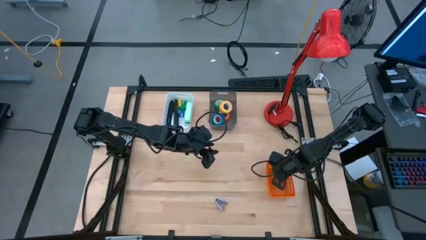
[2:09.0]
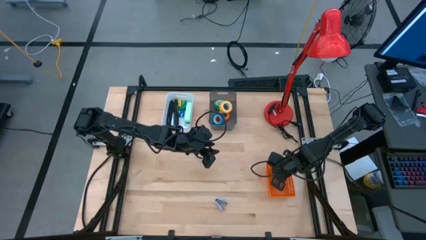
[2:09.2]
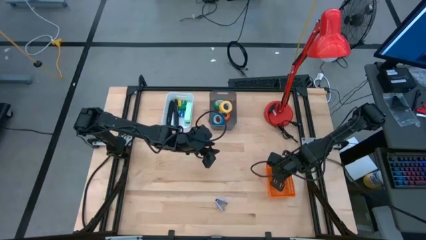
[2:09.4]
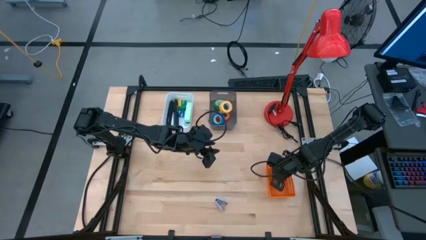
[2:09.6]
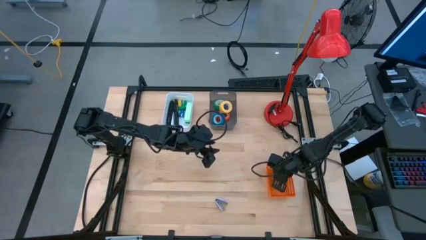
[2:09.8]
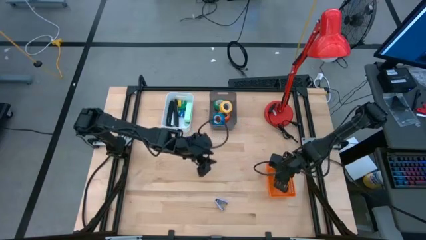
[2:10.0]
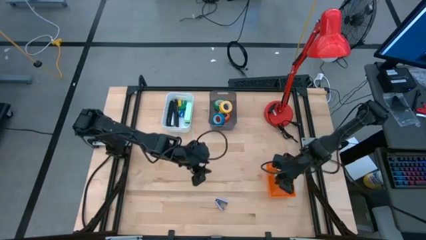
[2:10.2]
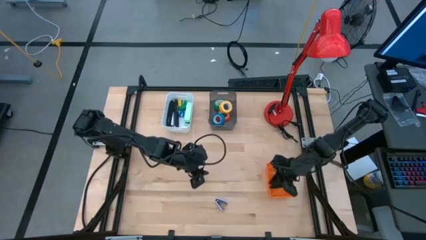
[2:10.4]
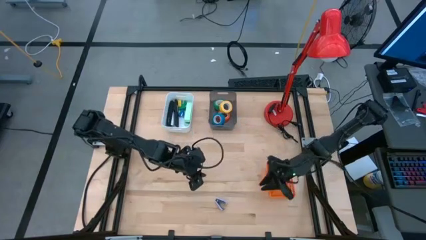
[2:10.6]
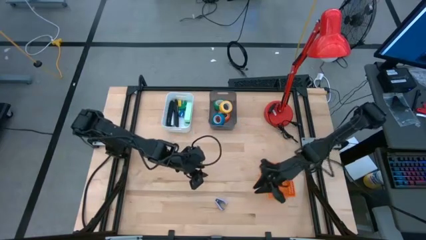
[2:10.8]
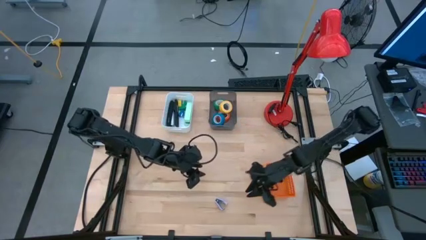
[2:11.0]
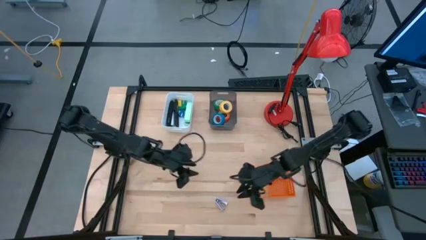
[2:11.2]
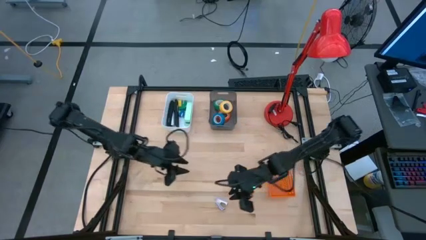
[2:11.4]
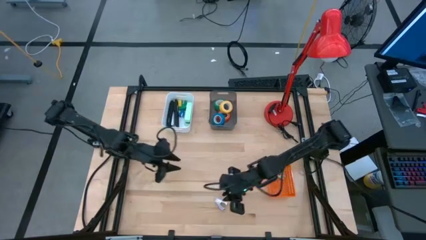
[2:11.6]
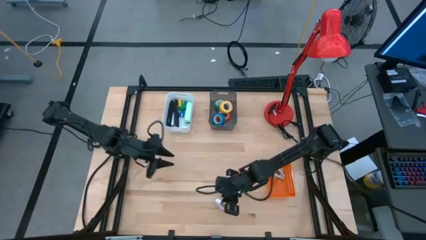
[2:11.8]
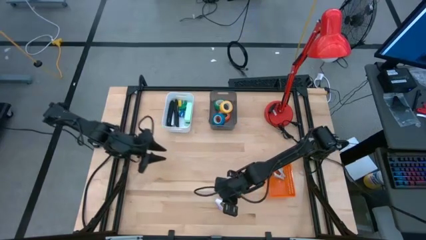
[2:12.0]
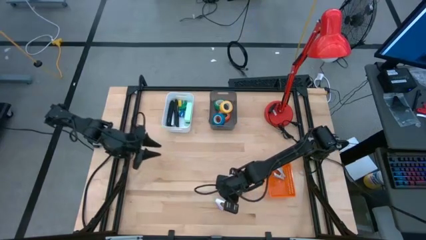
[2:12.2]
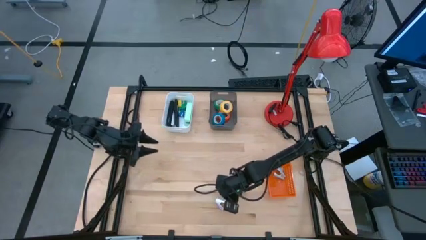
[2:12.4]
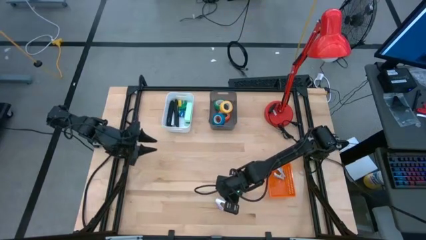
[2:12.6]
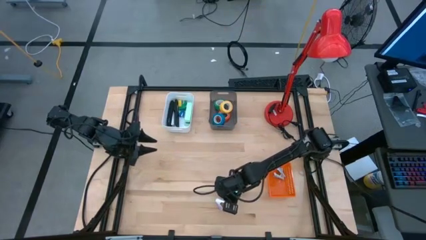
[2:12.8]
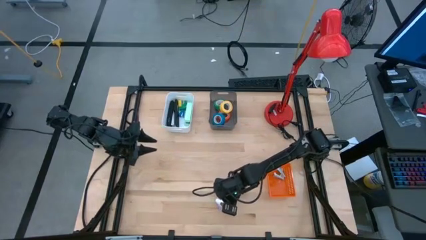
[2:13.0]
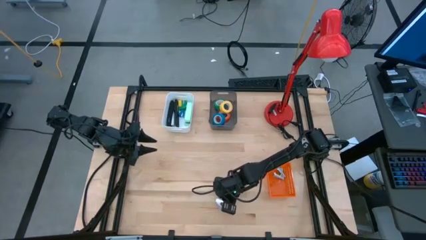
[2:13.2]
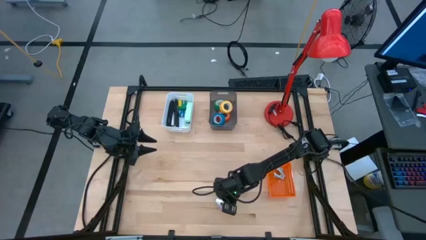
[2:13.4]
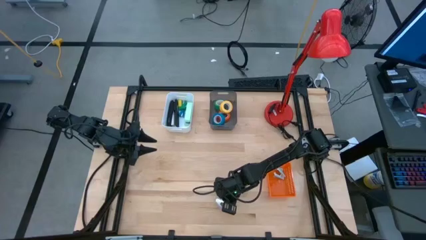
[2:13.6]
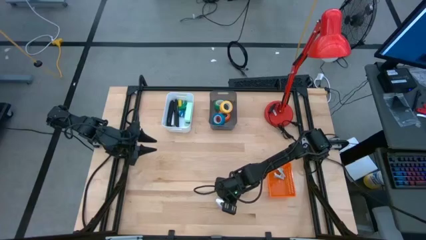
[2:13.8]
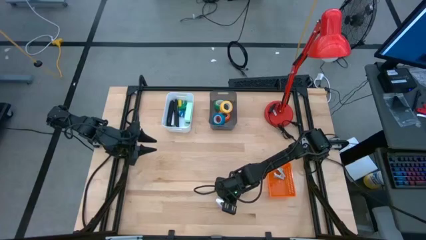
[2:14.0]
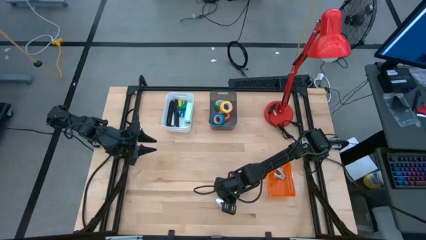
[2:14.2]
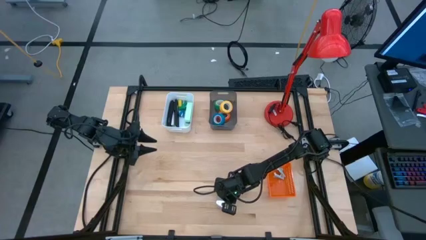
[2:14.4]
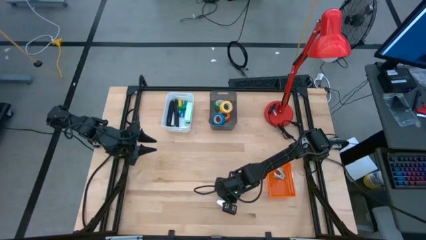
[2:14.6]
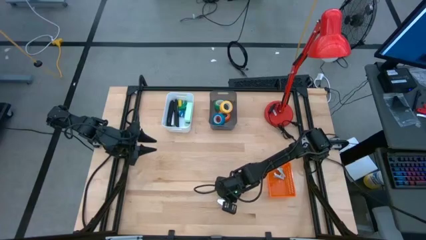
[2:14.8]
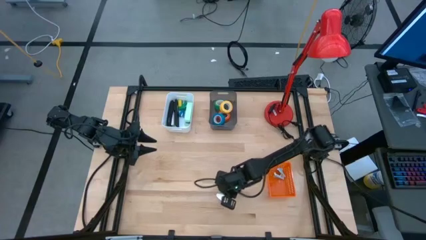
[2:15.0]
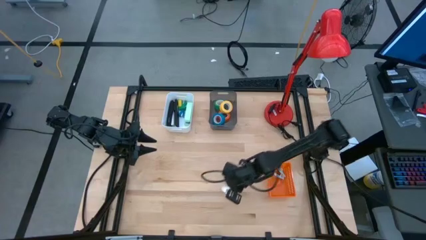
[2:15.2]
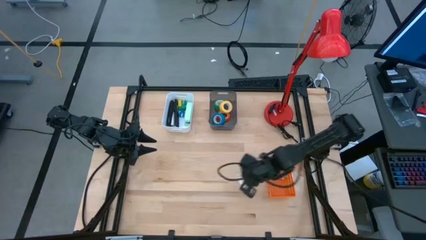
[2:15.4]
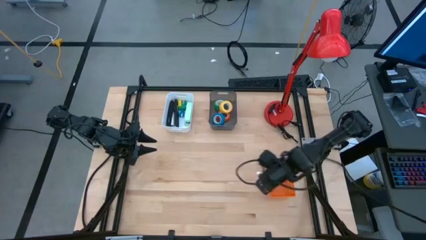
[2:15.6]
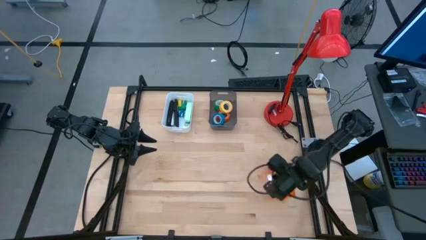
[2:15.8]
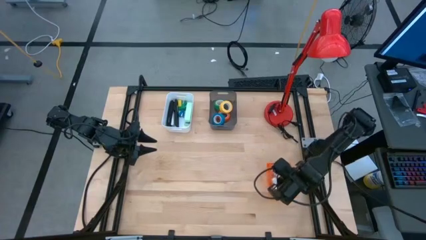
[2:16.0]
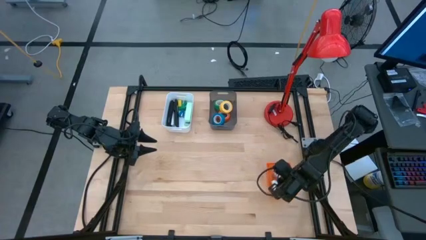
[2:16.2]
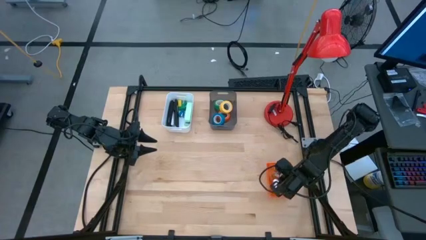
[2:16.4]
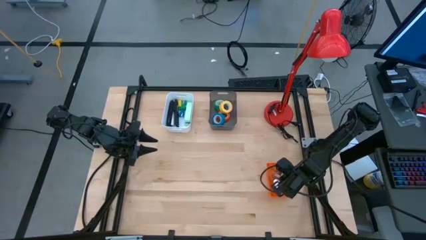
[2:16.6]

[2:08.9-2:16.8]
Task: Pick and place Stapler, Stapler remover, tape
Put the purple staple remover into the orange basket

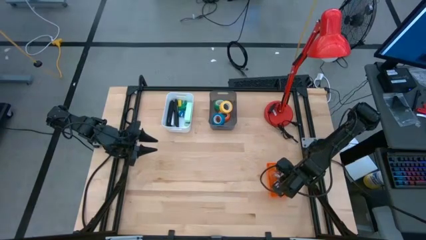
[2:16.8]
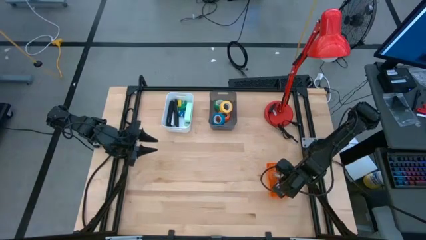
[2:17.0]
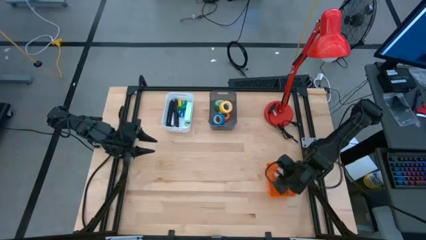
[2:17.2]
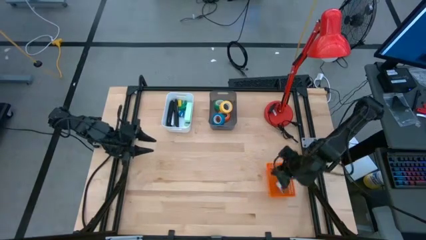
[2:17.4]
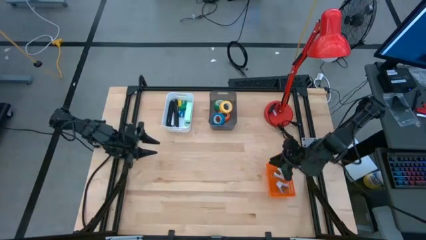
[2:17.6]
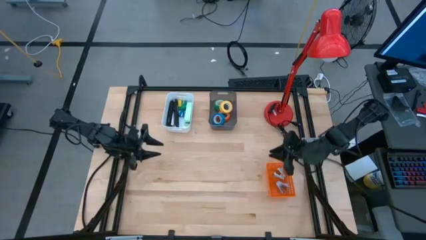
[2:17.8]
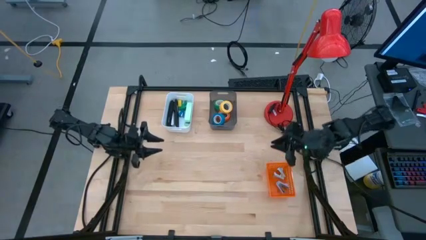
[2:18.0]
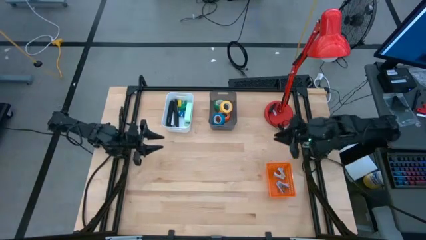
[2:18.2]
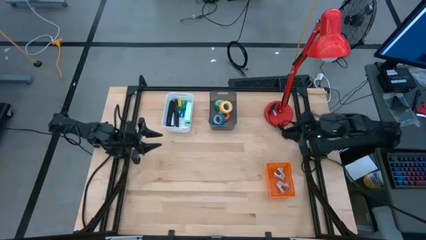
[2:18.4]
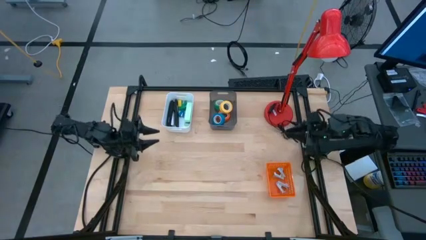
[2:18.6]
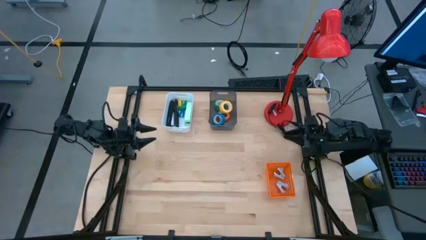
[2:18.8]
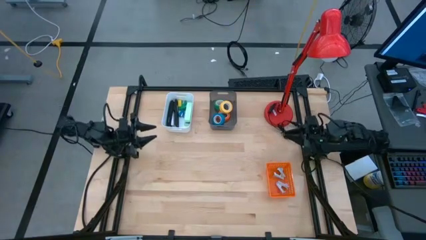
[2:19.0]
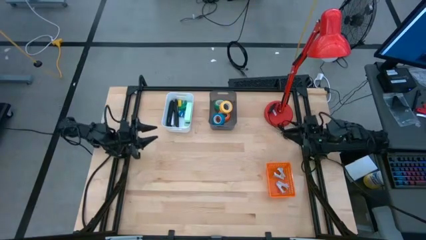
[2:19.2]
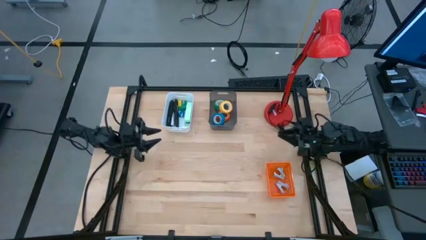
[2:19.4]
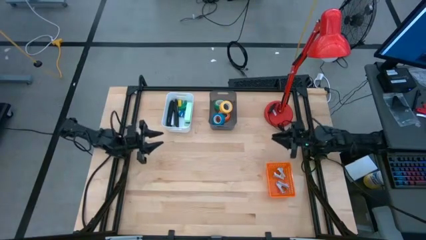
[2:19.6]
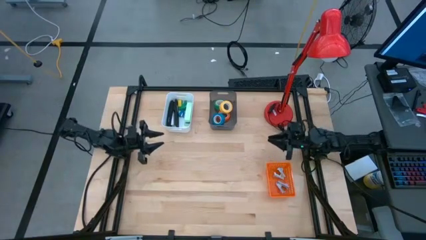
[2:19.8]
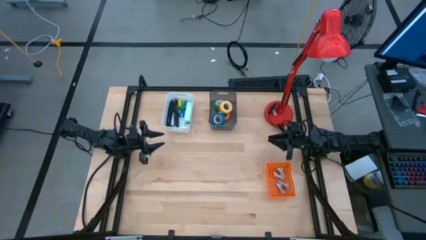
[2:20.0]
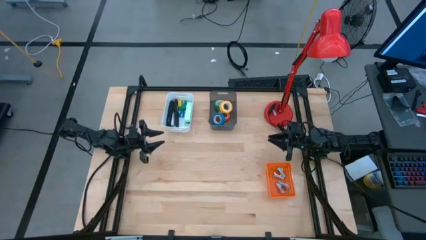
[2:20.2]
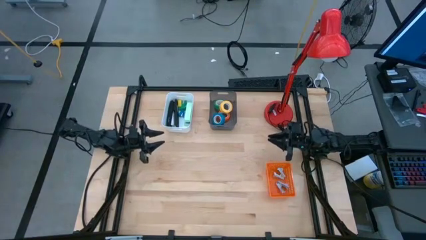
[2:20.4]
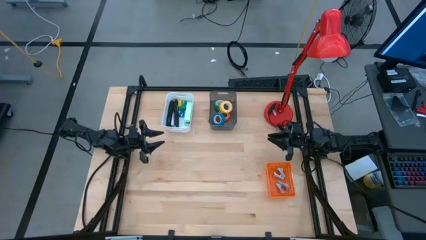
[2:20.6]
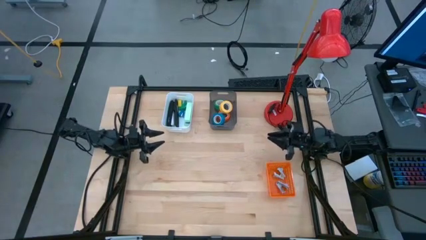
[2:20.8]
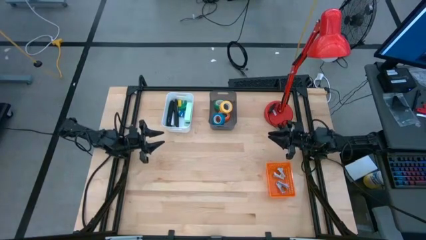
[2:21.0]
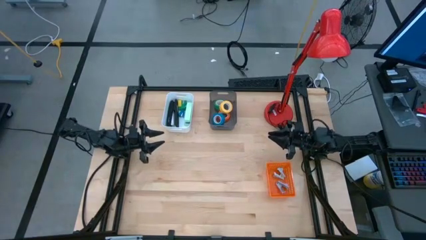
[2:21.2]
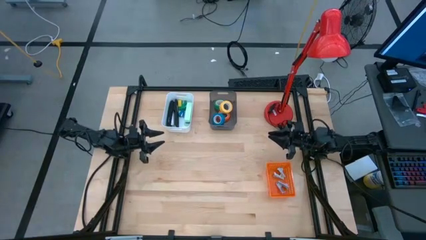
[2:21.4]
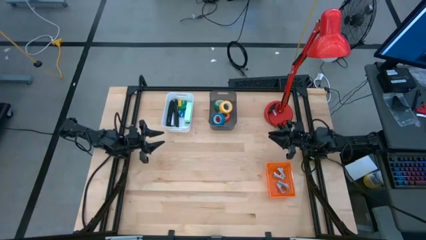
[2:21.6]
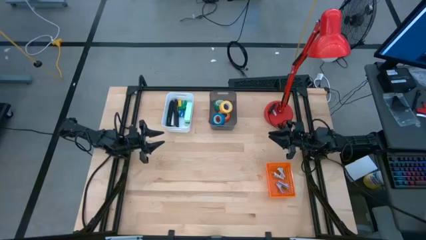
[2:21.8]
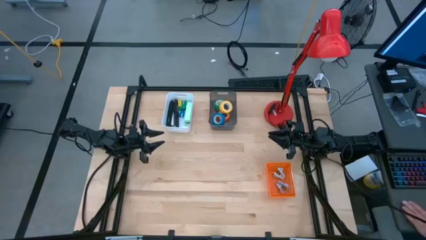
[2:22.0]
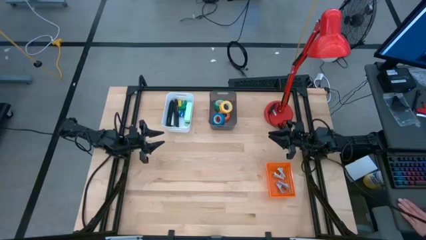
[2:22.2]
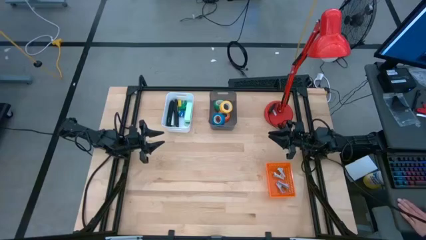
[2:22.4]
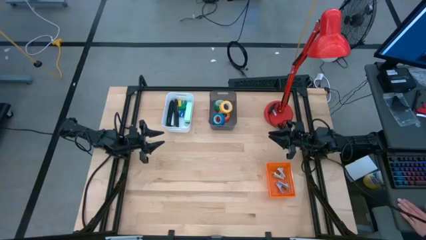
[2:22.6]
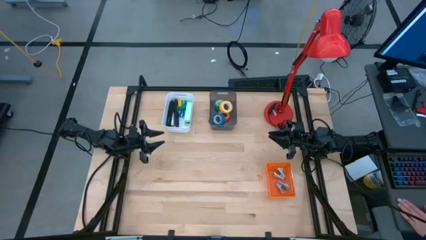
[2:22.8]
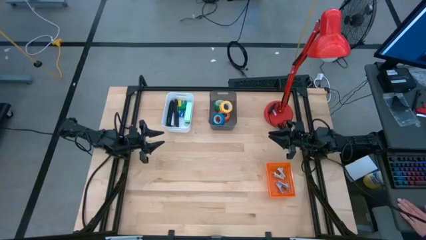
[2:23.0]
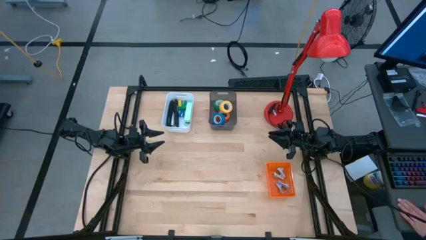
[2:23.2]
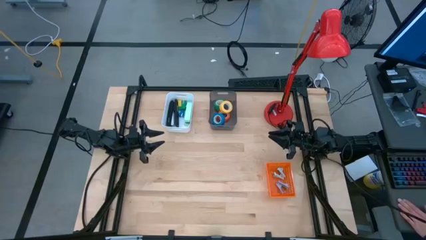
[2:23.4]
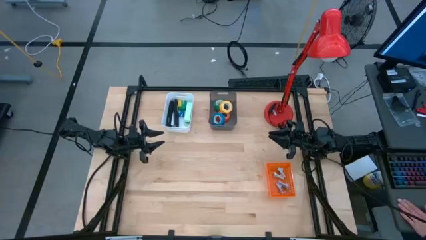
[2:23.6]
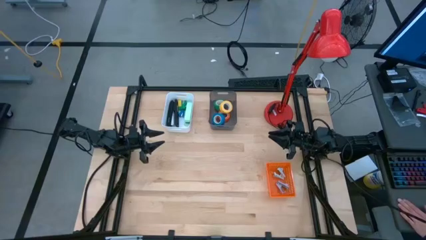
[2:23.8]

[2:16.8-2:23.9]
Return to Home Position
